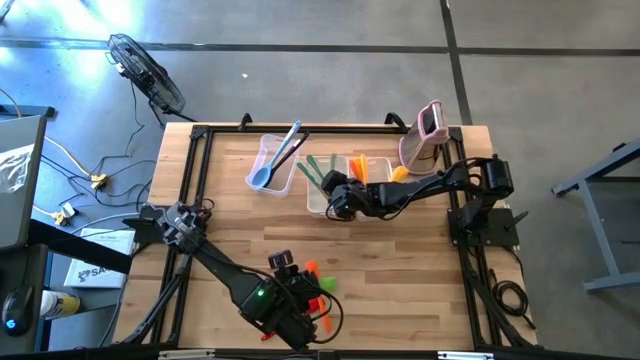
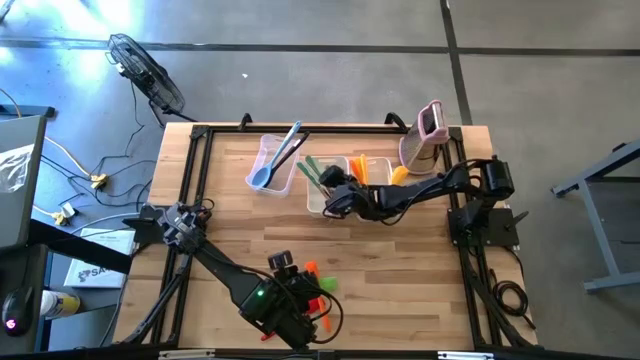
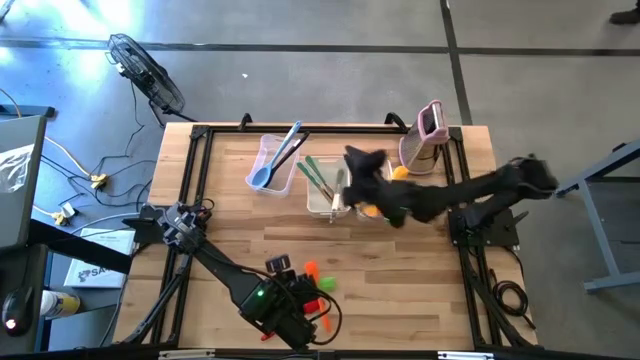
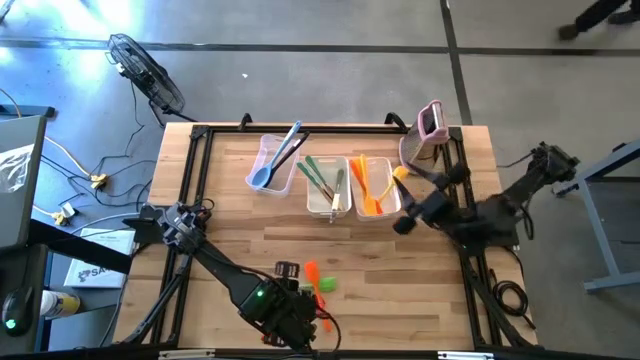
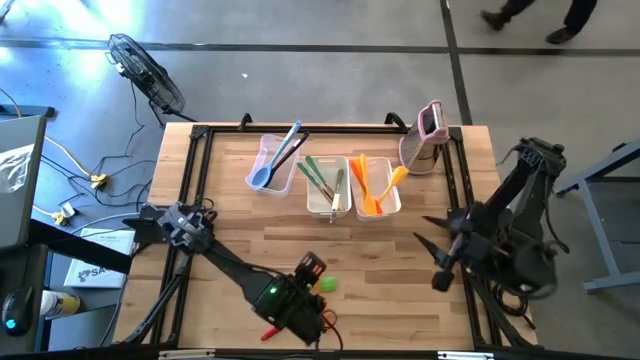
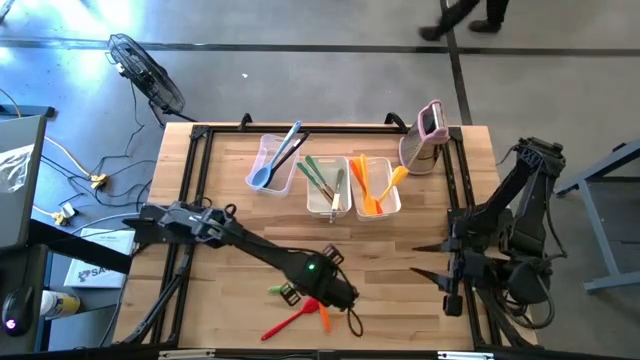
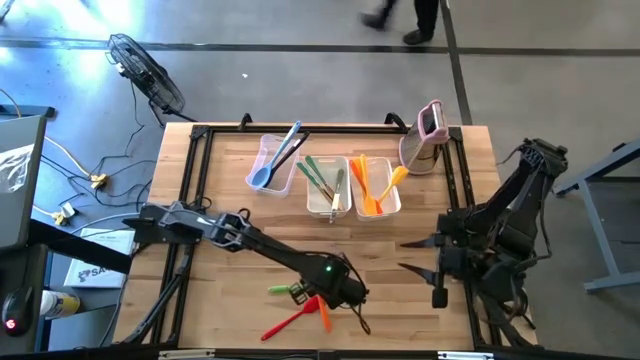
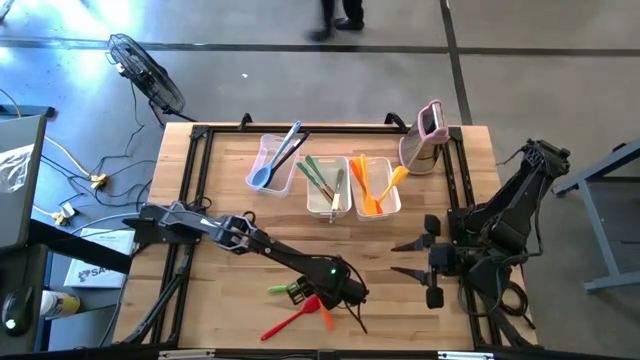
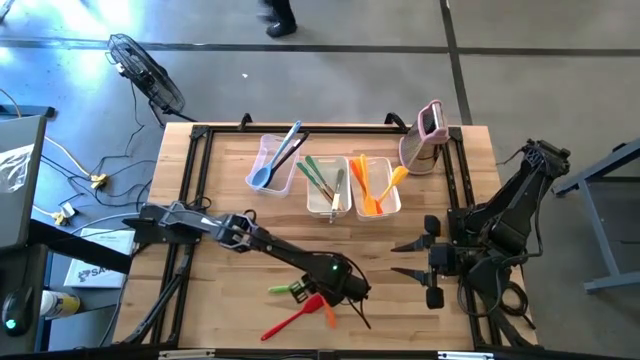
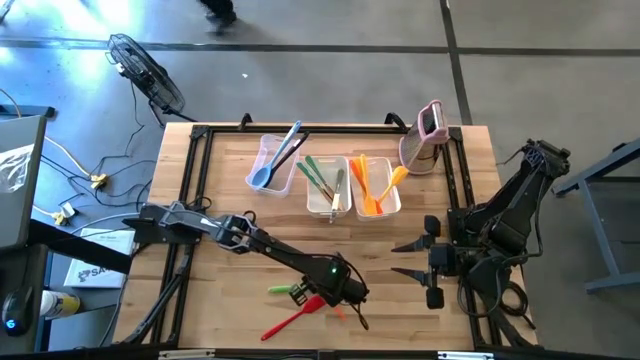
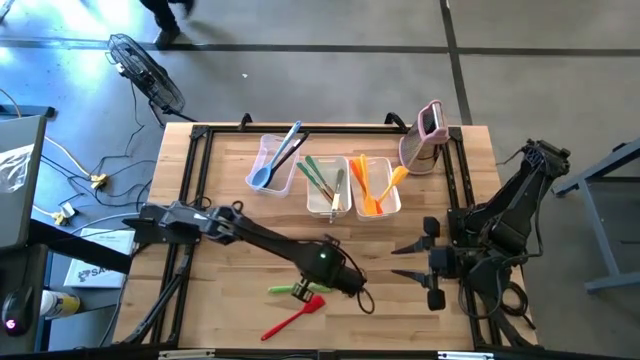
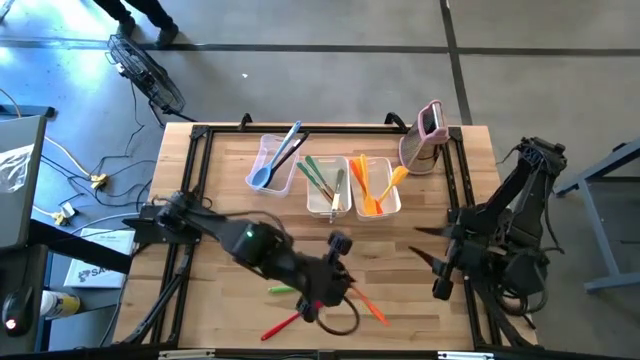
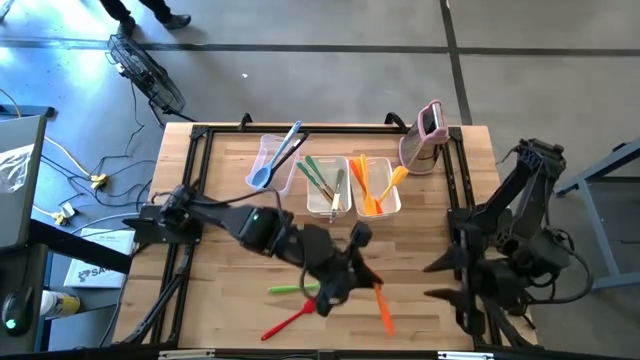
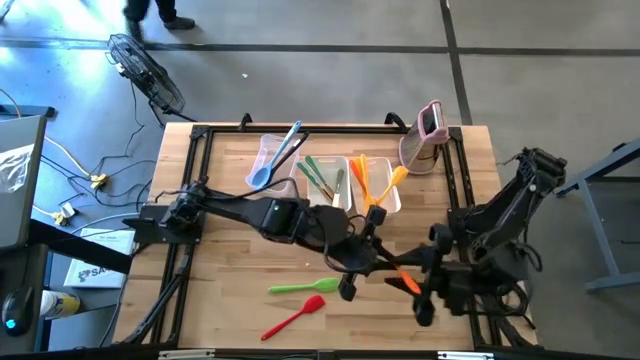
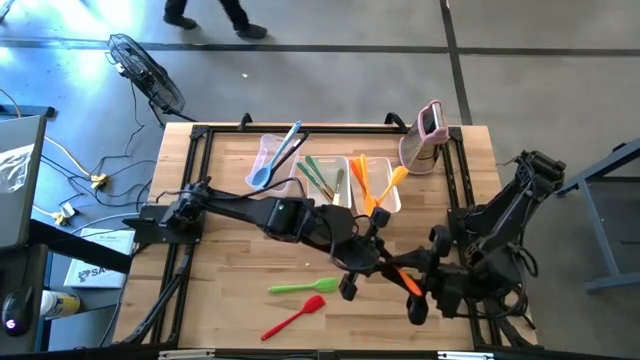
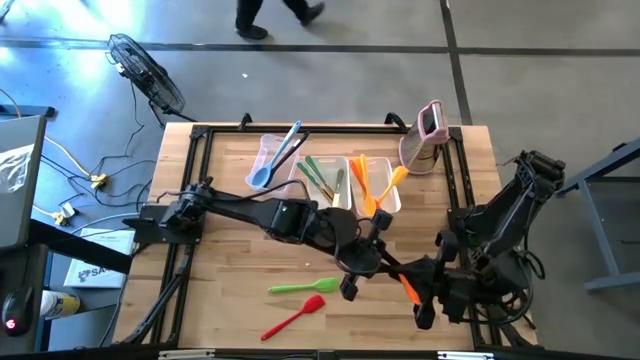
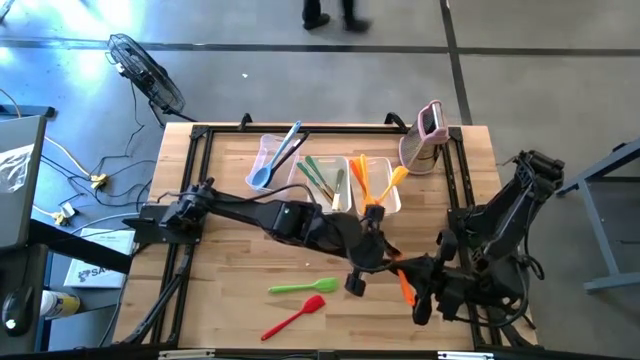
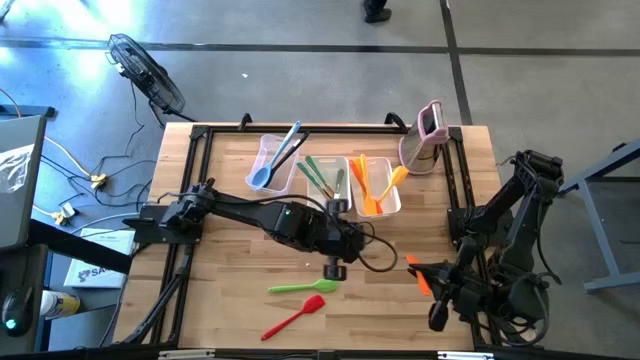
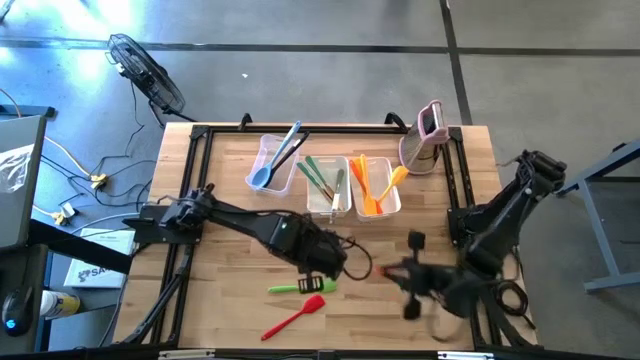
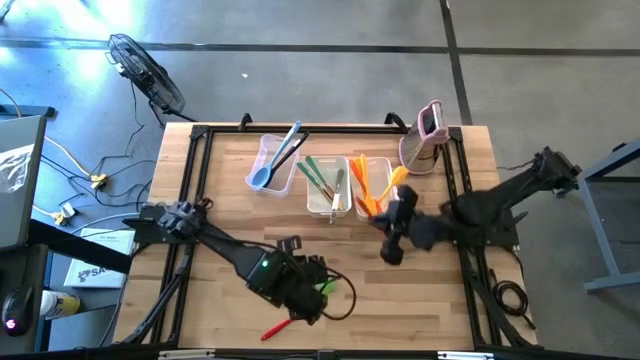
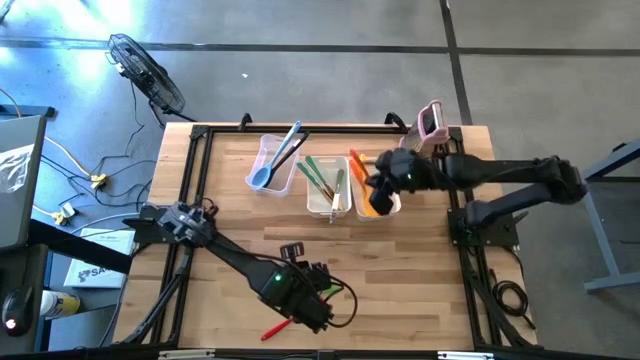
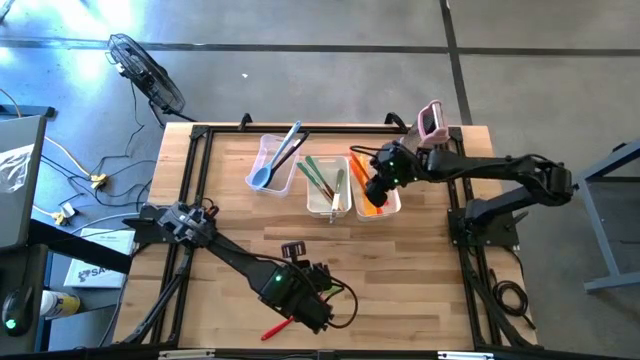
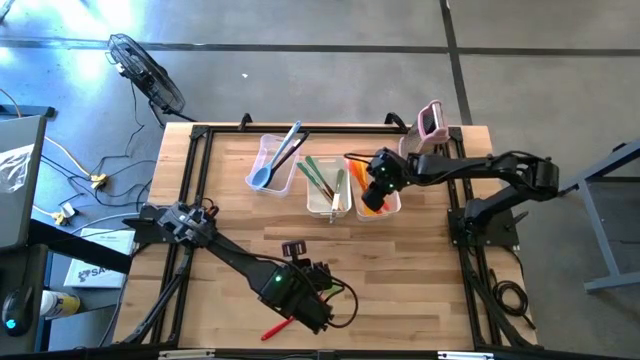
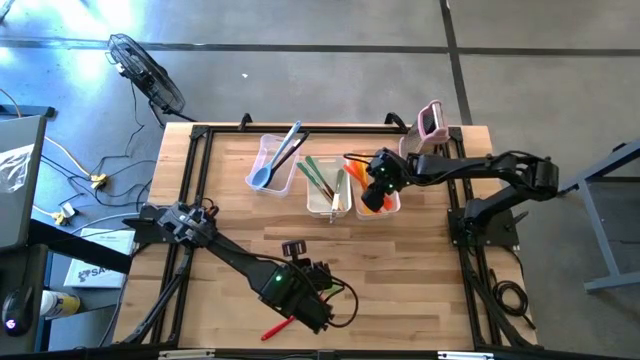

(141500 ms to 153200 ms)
Task: Pick & Place Kitchen Items
Put the orange spatula into the right white bin

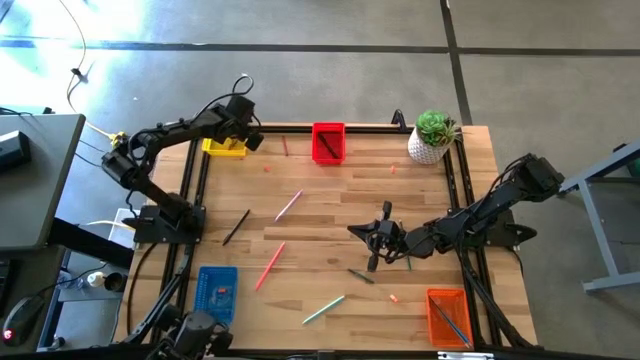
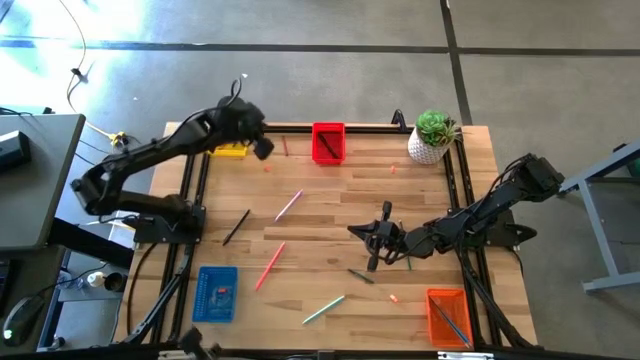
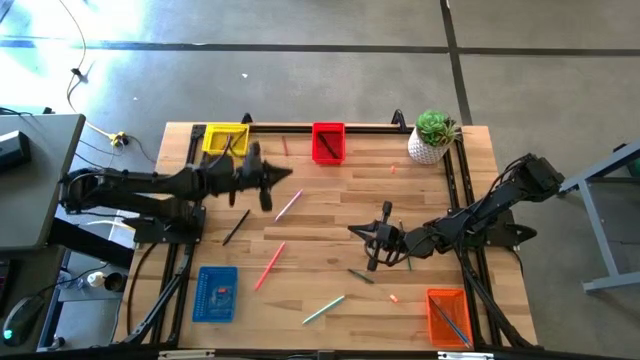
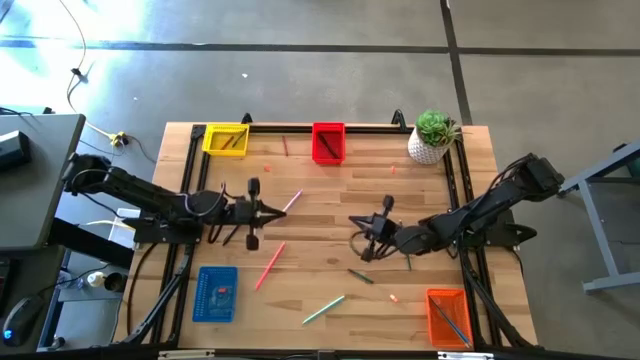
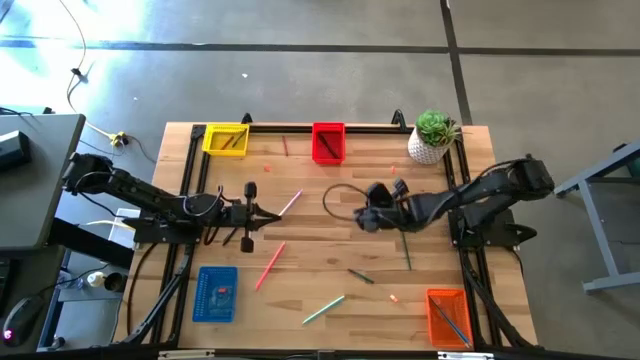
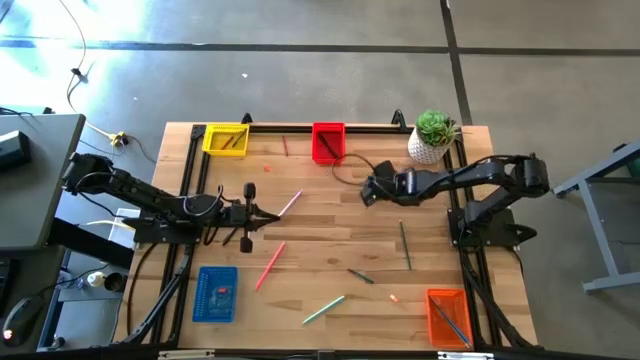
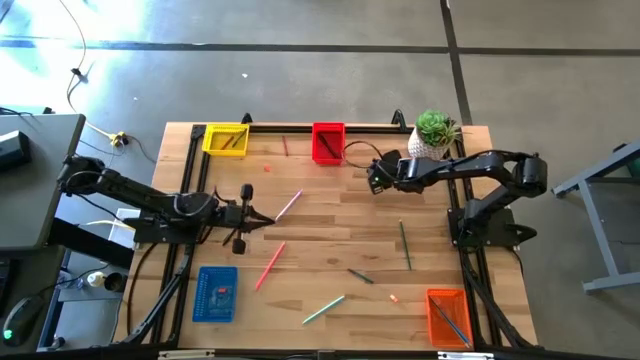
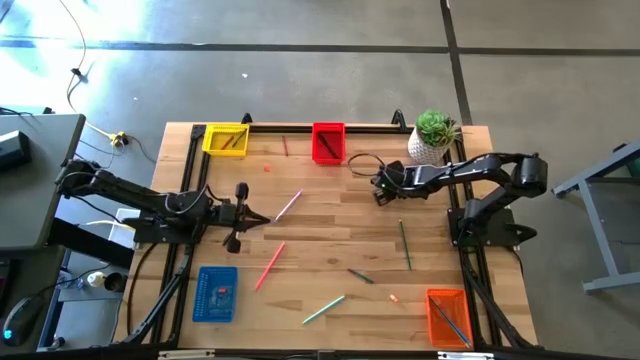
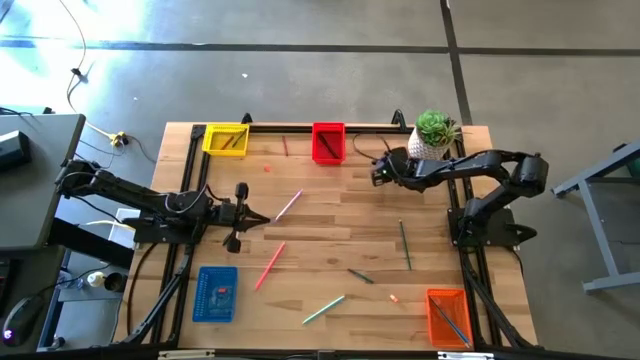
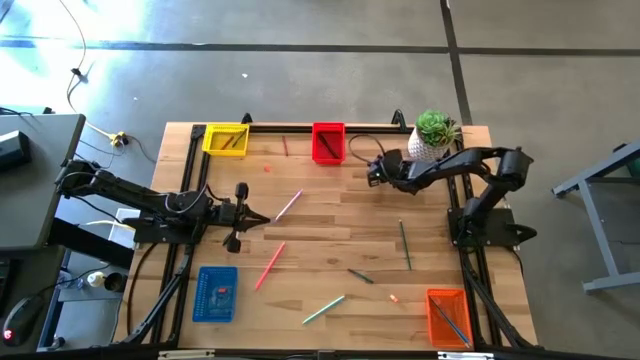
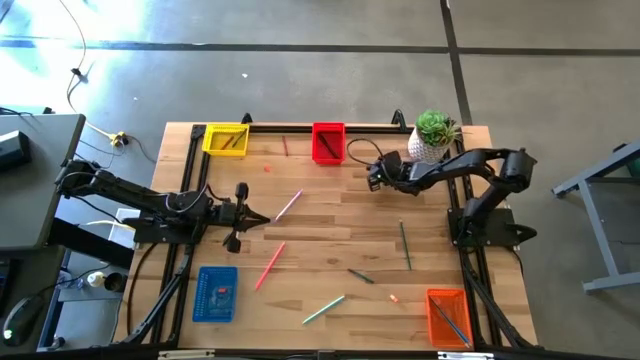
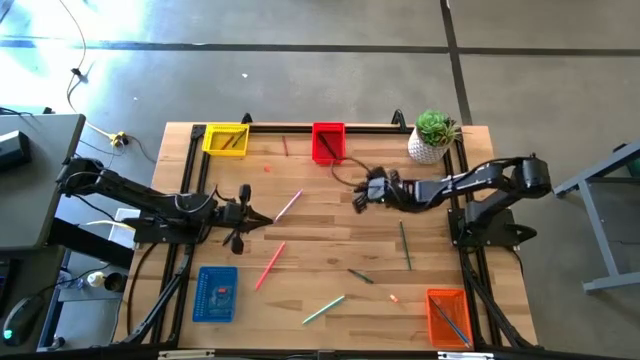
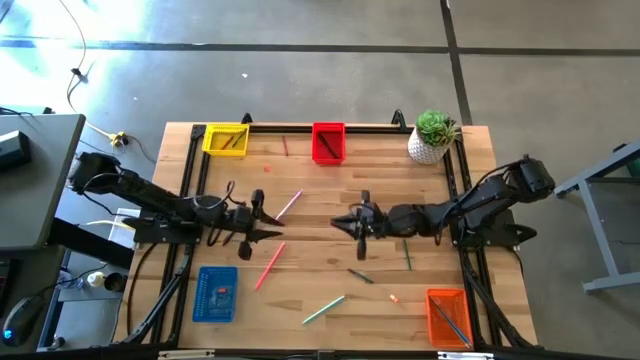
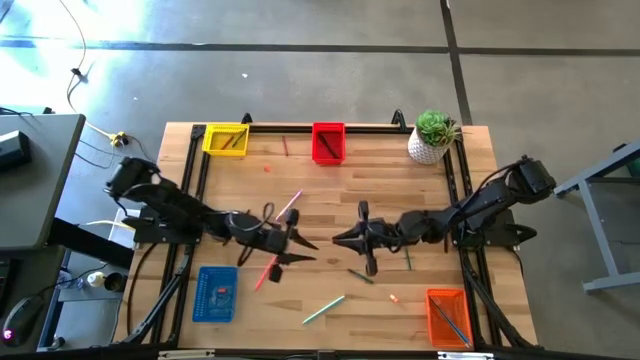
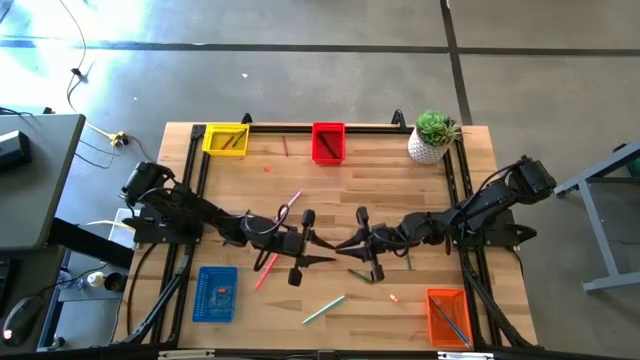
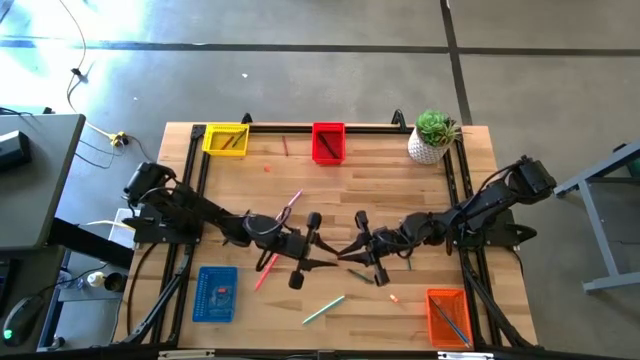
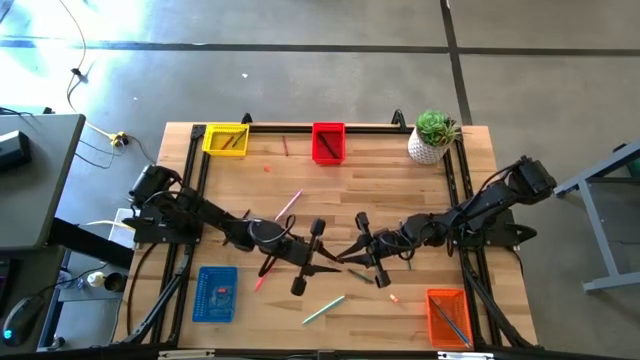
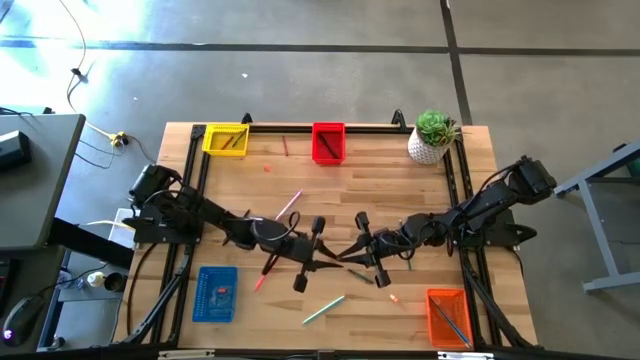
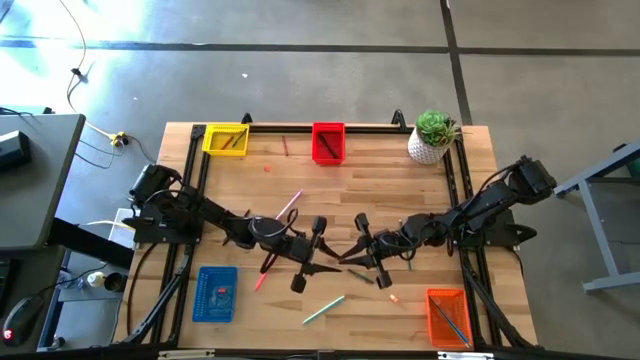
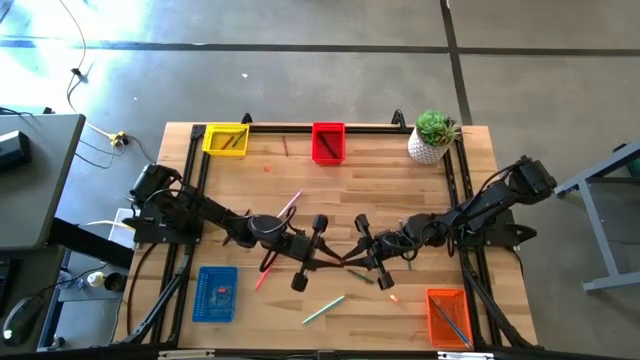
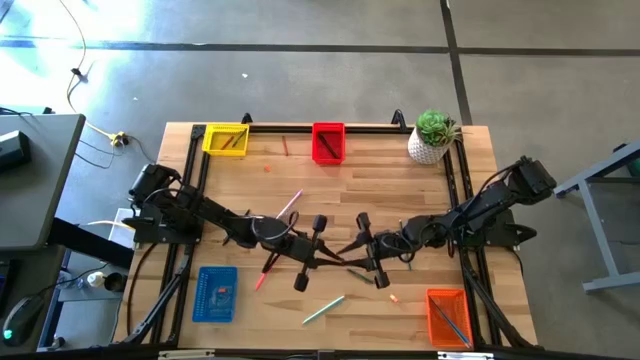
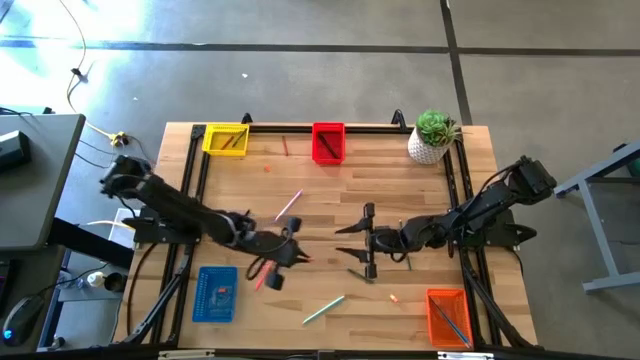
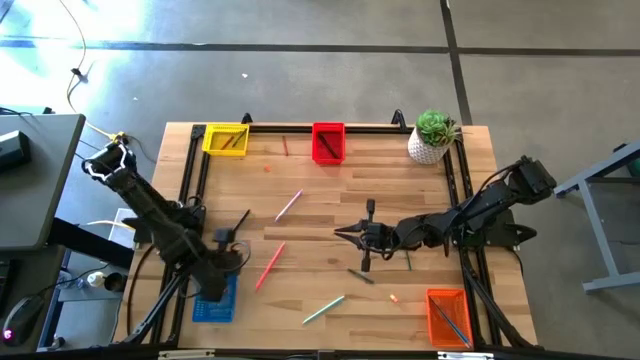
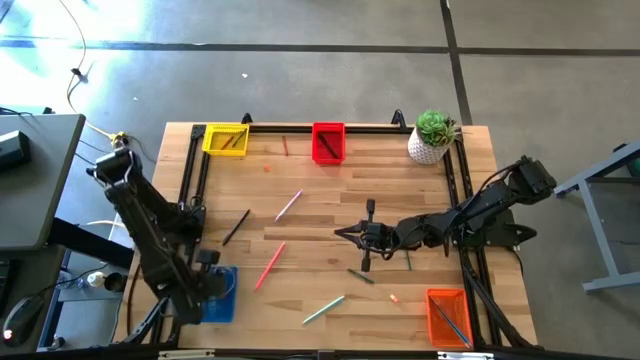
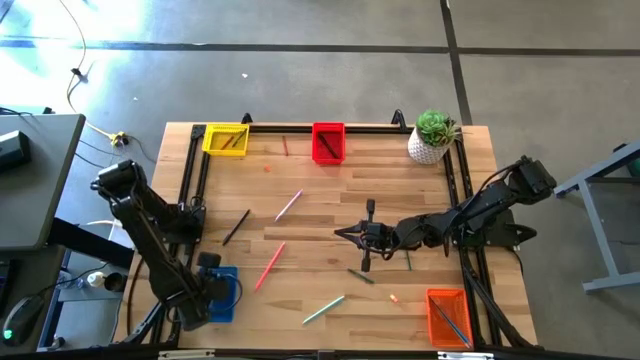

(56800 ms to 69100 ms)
Task: Sort crayons/erasers/pens/pencils in bins
Put the top right orange eraser into the blue bin
